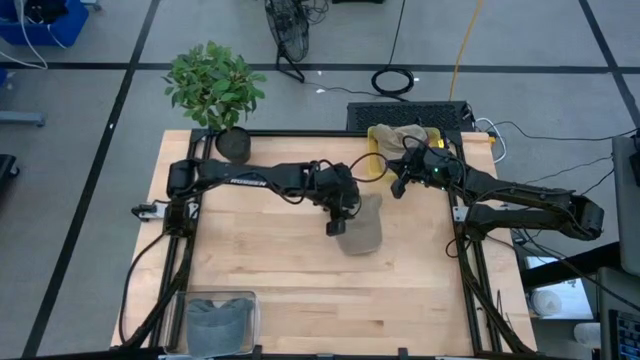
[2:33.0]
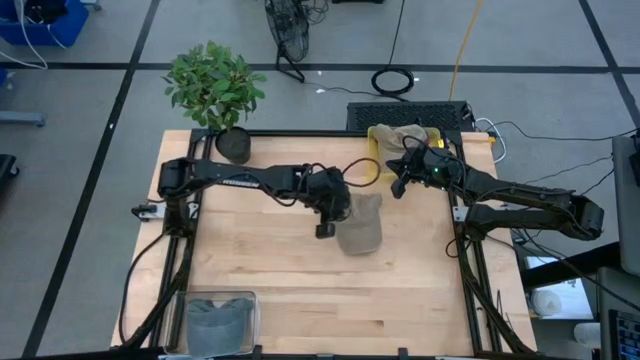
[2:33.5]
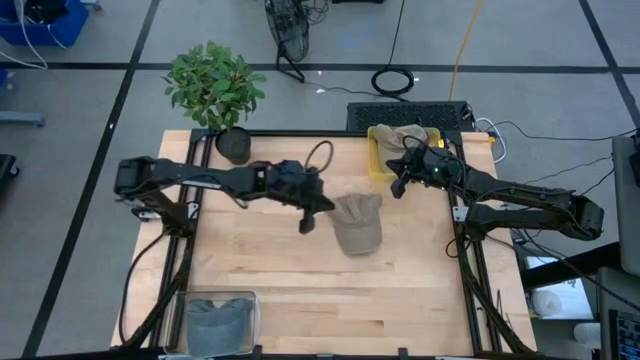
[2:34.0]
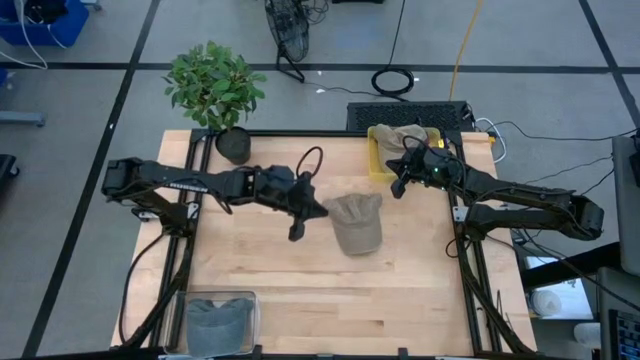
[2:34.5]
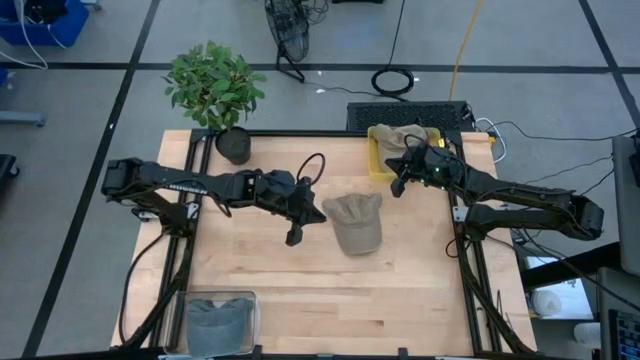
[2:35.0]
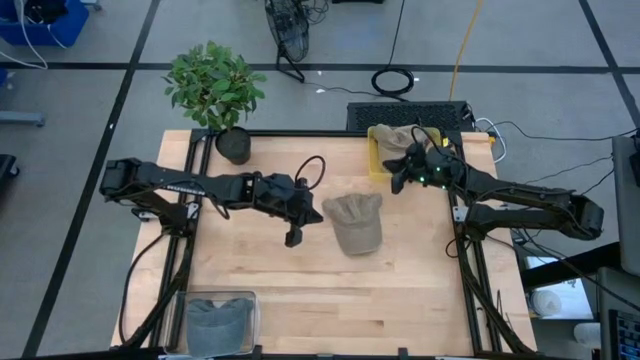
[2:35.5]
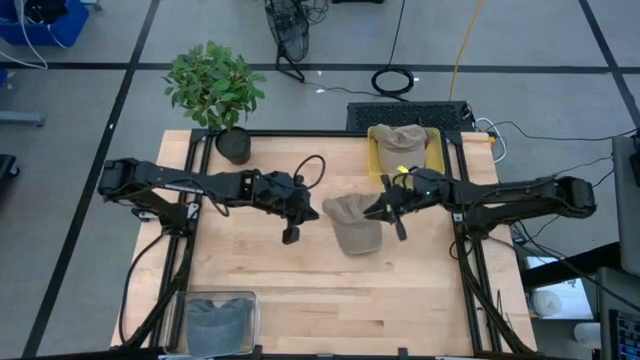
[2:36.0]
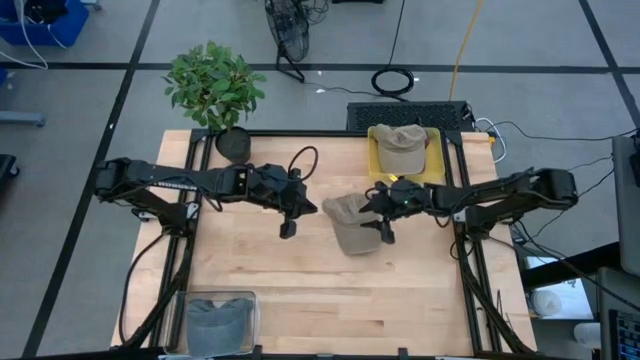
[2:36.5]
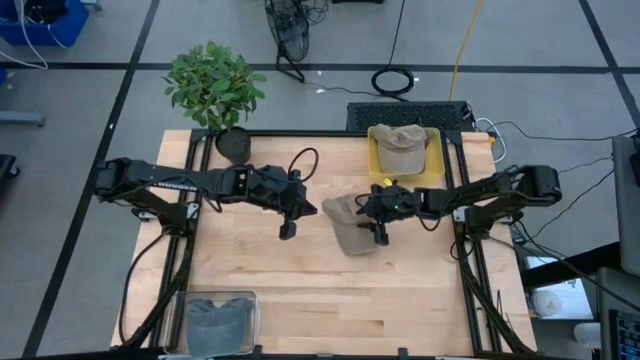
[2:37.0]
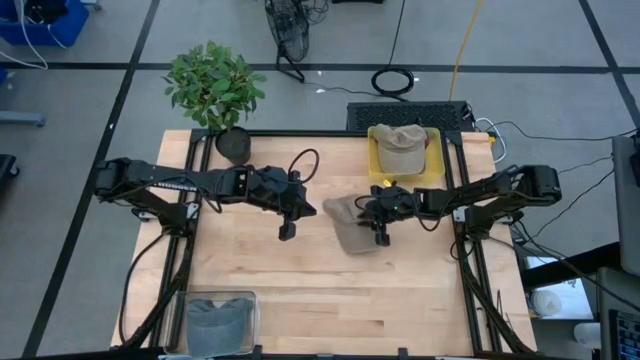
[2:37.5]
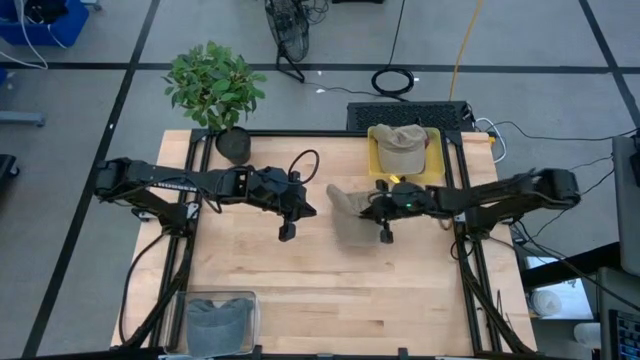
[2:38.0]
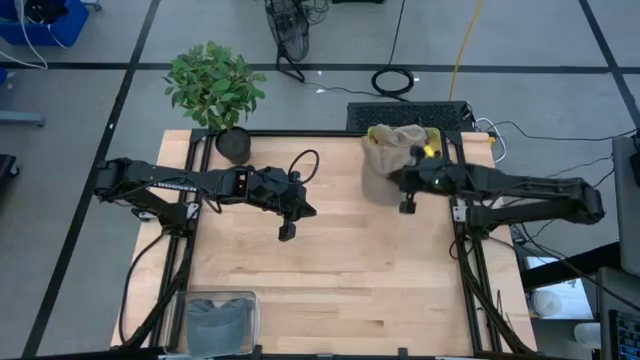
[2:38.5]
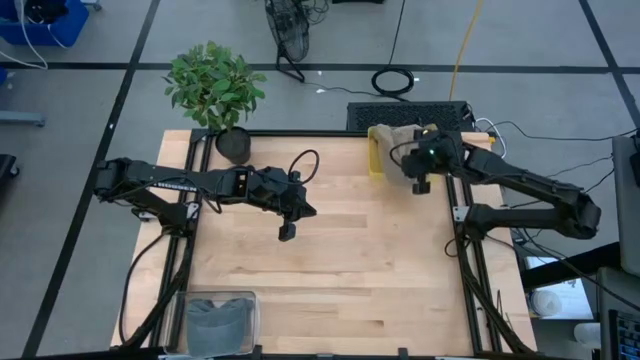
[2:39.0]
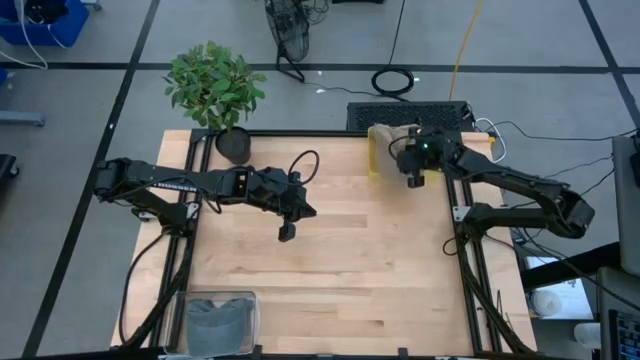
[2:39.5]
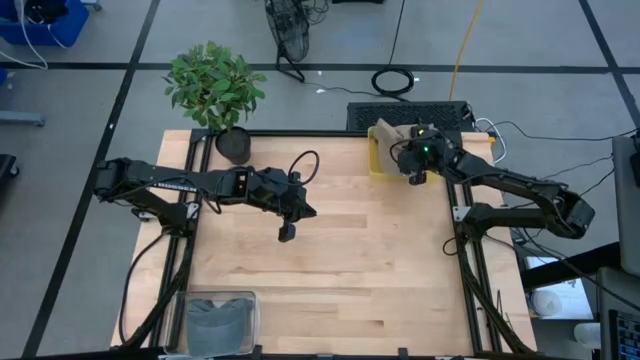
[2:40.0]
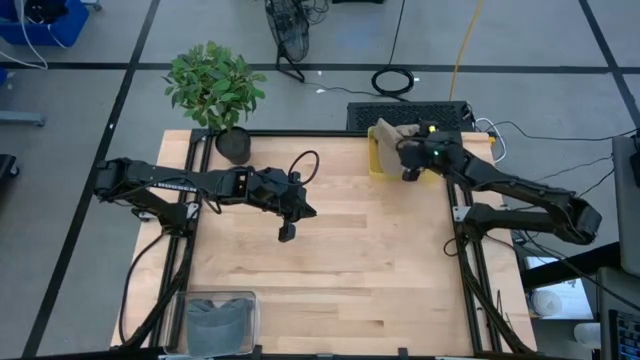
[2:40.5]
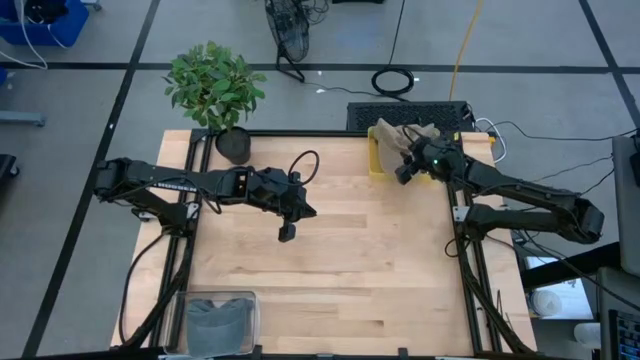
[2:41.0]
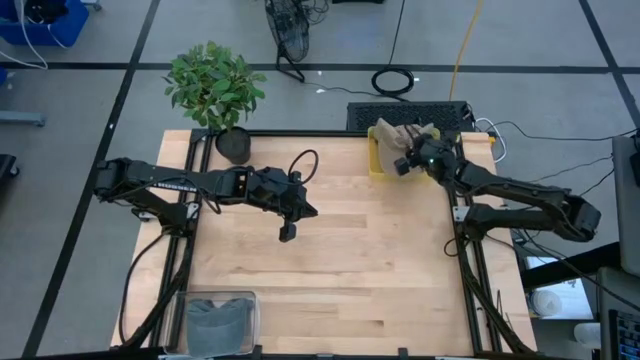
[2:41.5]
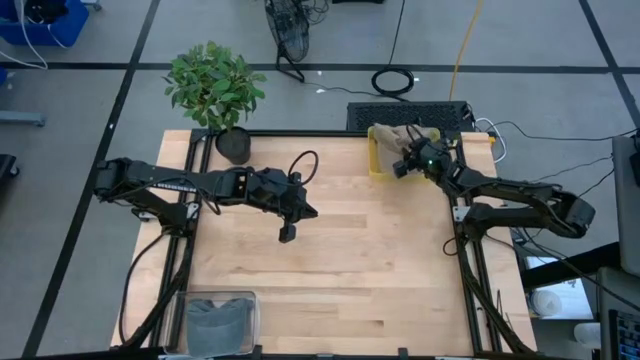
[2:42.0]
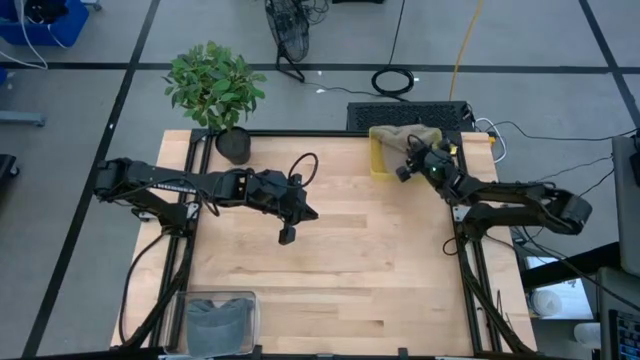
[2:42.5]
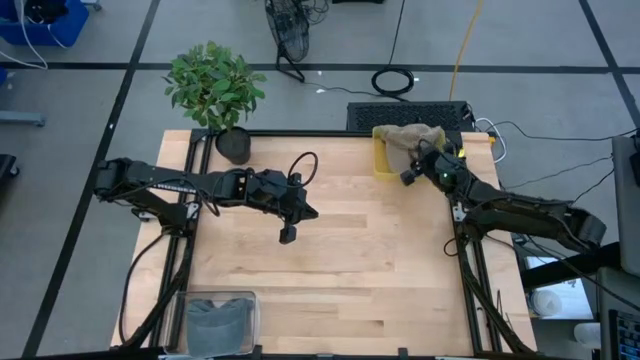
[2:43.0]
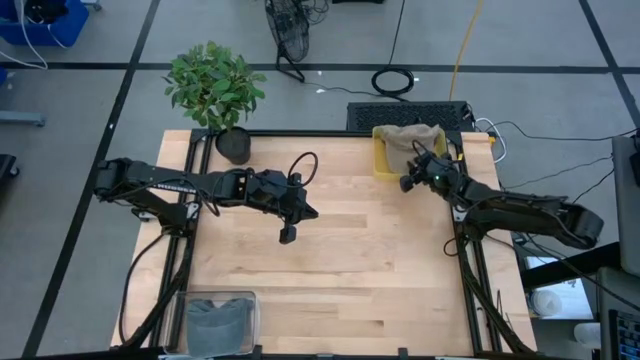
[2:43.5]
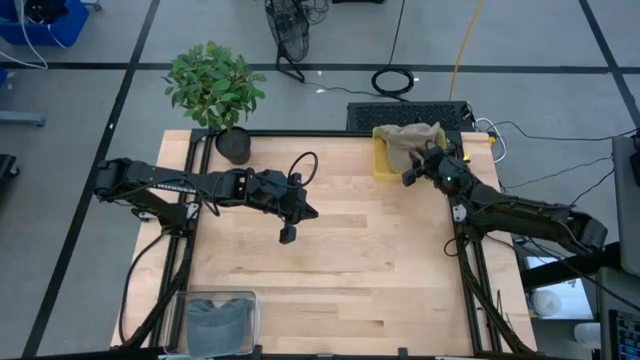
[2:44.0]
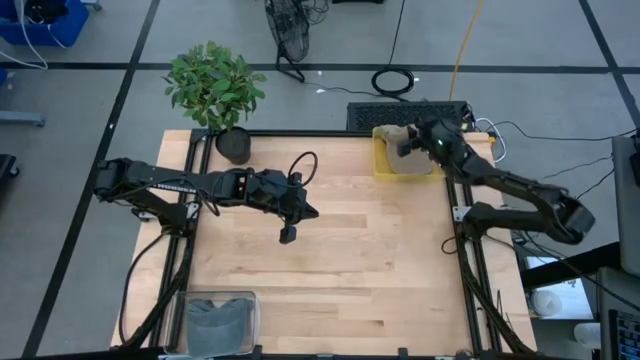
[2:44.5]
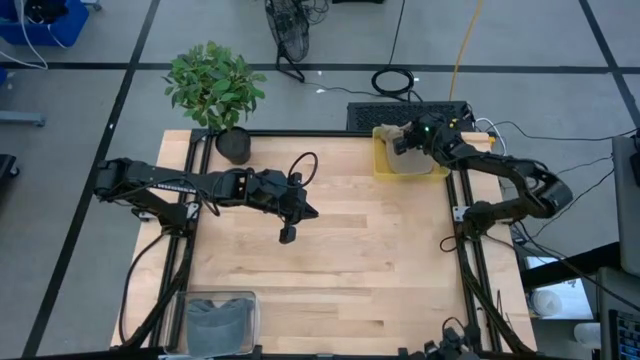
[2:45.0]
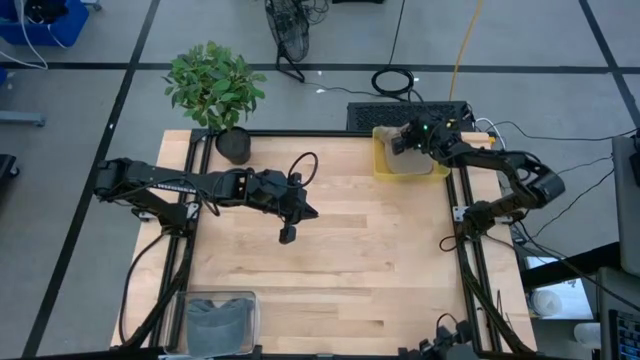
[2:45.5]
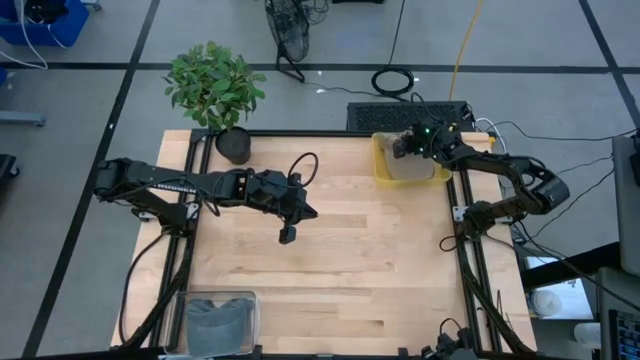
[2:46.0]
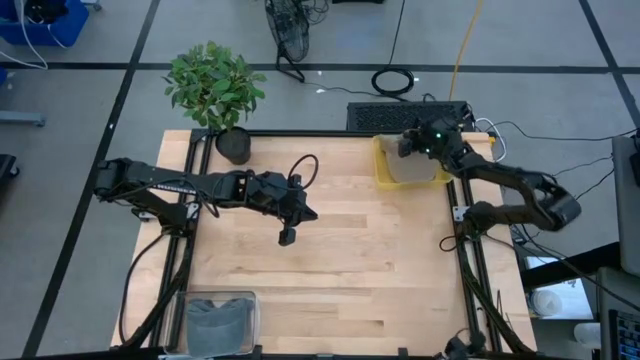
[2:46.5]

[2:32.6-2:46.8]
Task: Pick & Place hat
Put the brown cap into the yellow bin

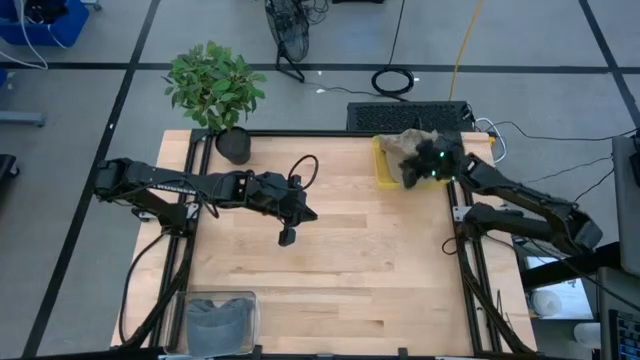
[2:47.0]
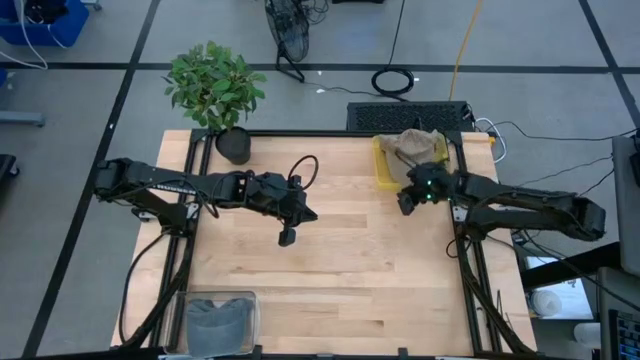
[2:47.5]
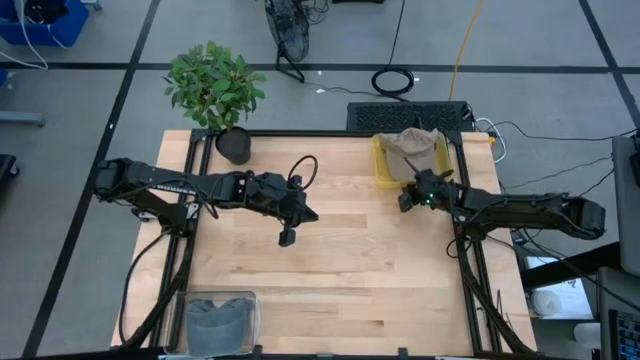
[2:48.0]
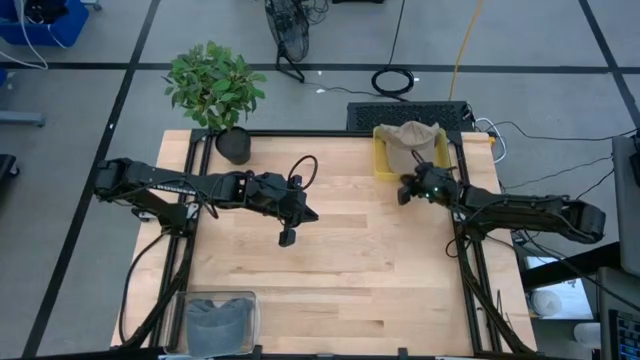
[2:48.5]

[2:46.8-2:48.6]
Adjust the yellow bin

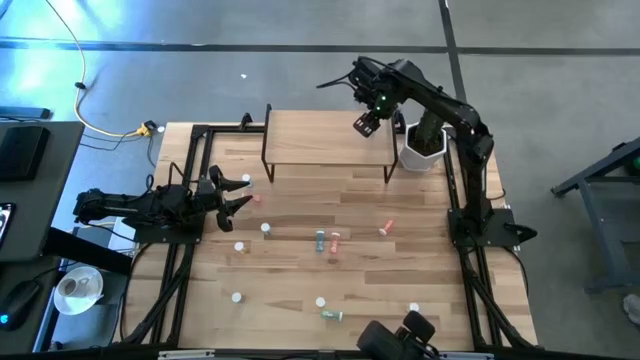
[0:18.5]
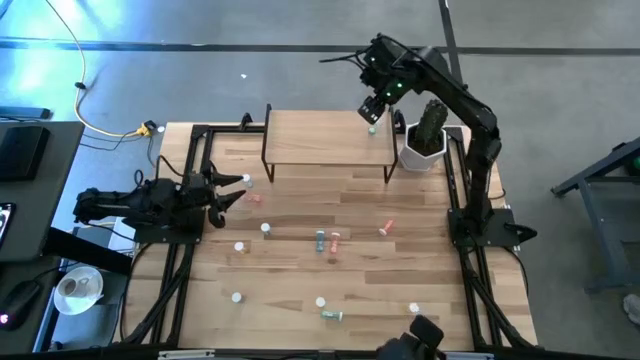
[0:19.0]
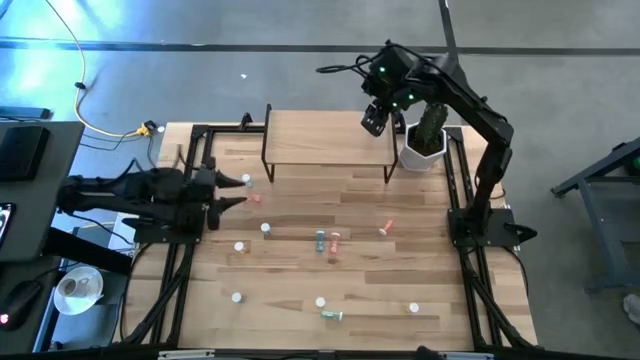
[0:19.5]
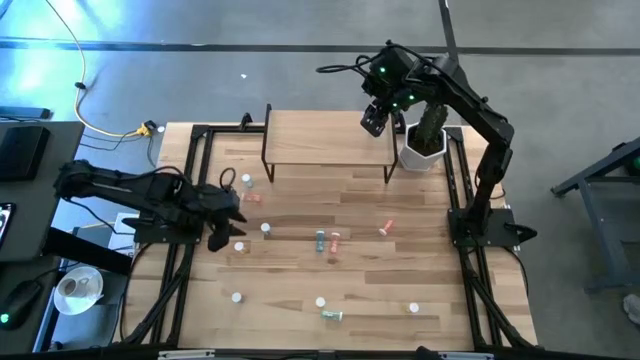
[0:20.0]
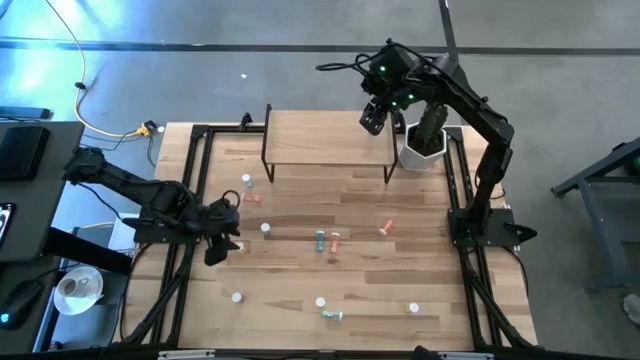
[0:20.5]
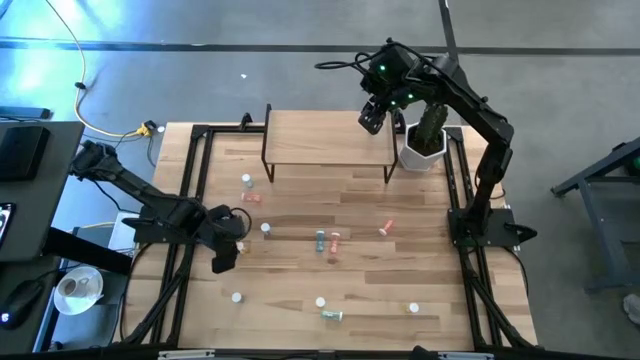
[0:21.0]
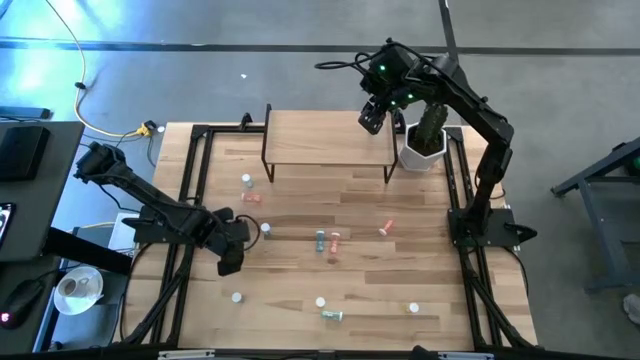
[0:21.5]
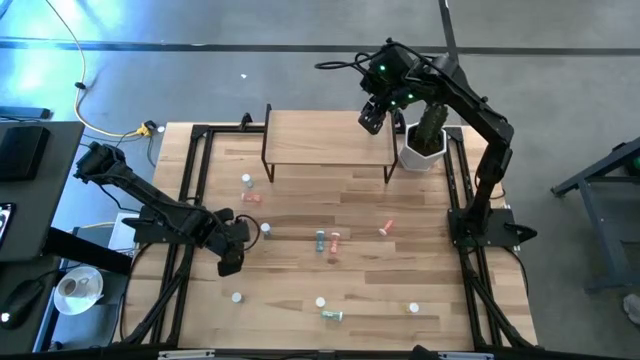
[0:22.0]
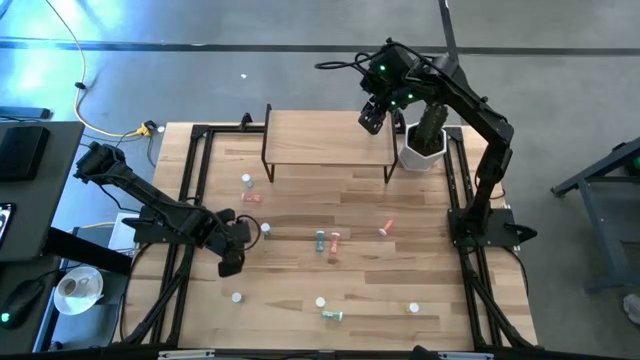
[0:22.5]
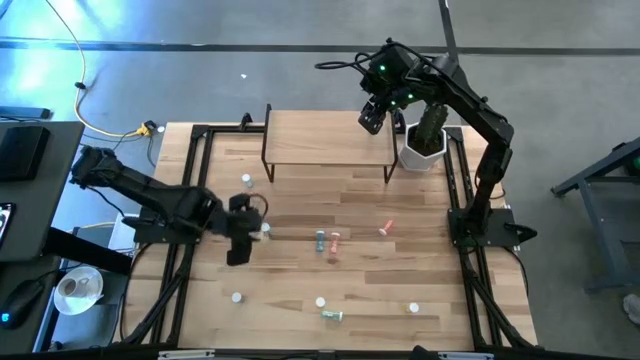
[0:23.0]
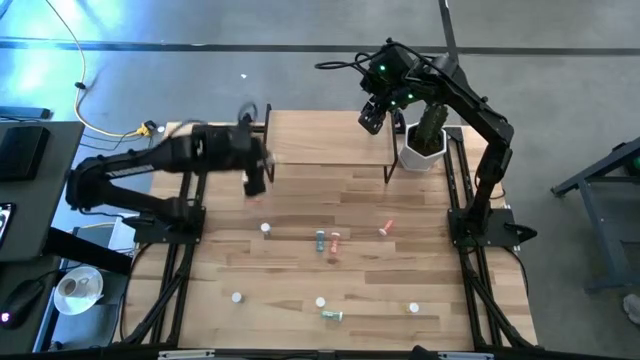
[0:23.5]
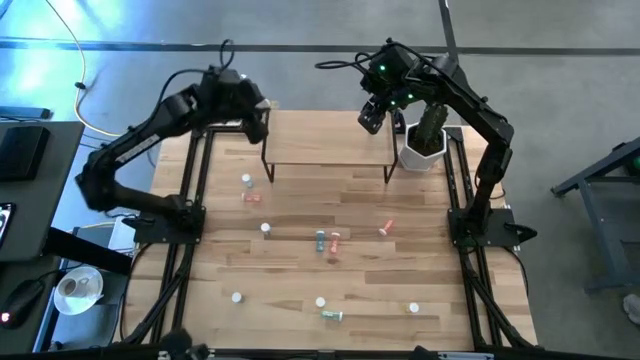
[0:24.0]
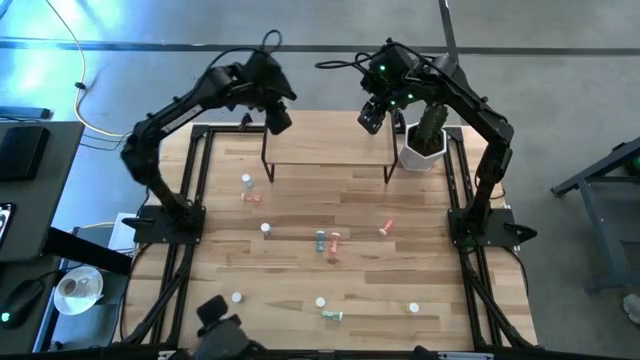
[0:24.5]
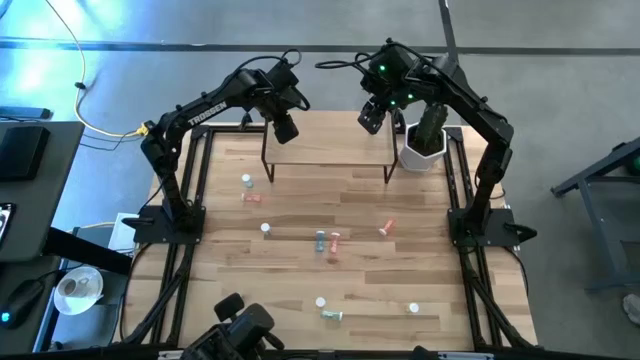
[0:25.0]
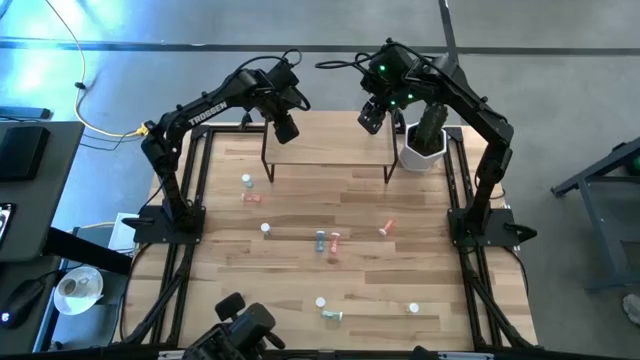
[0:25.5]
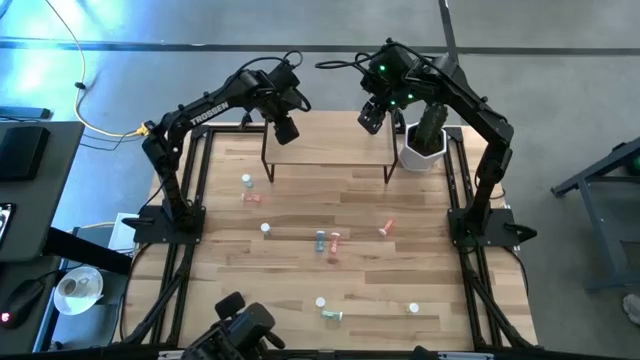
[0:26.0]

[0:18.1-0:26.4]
Task: Pick and place medicine bottles onto shelf by color
Put the top left yellow pill bottle on the shelf
